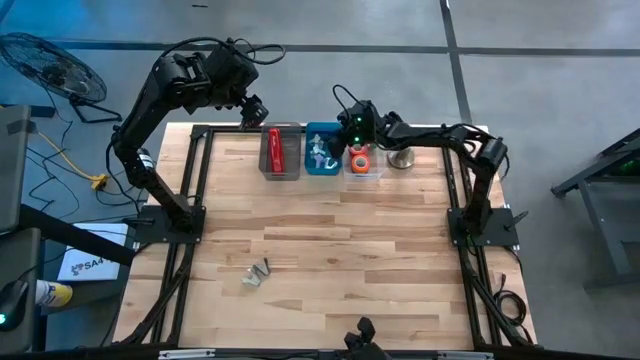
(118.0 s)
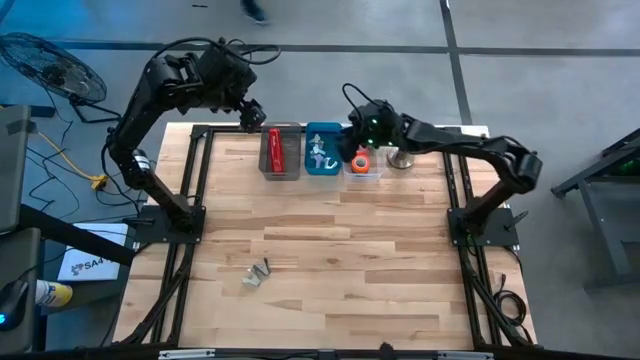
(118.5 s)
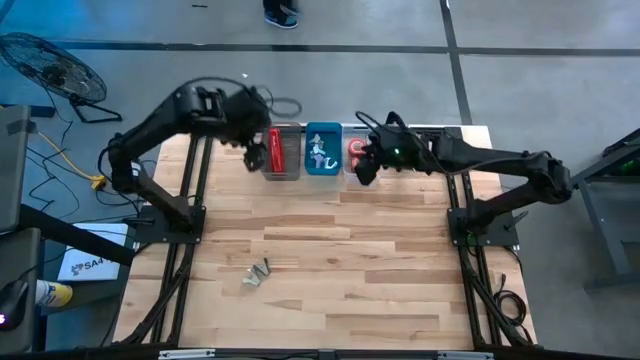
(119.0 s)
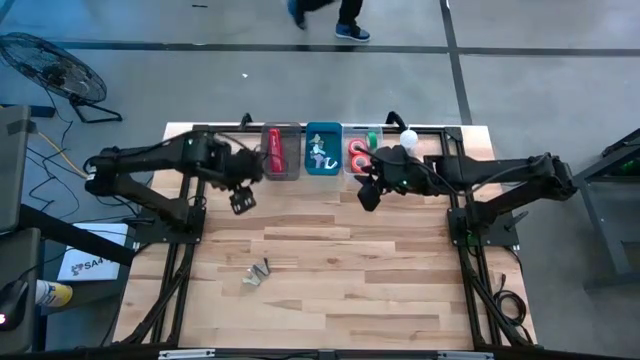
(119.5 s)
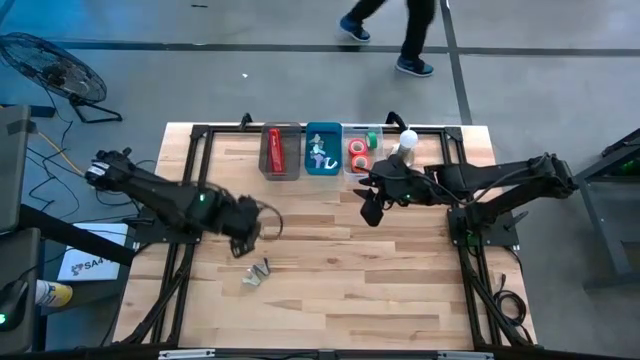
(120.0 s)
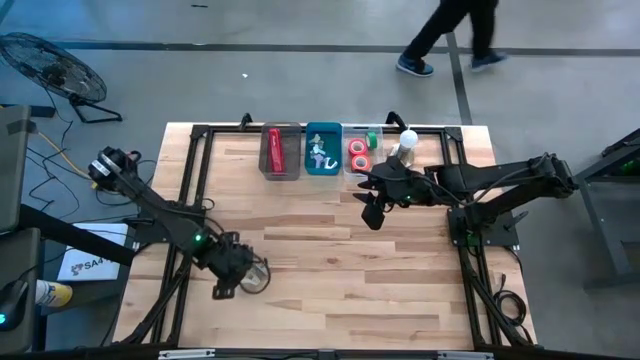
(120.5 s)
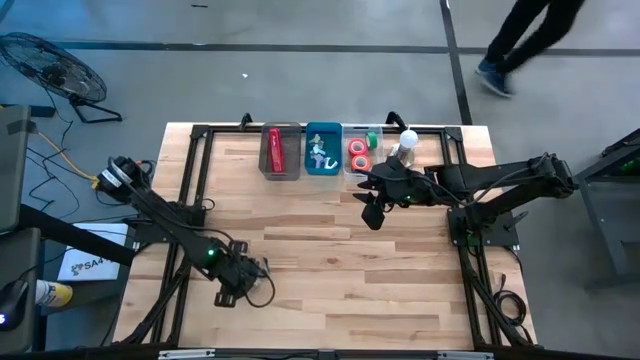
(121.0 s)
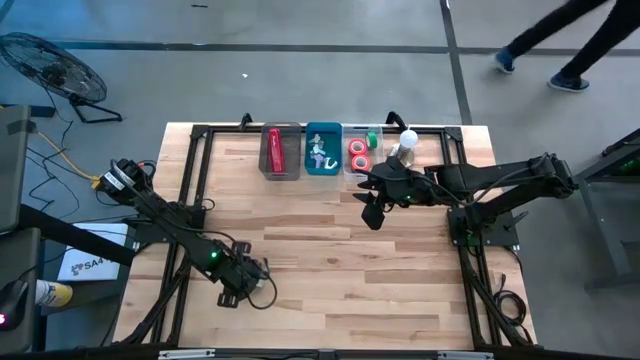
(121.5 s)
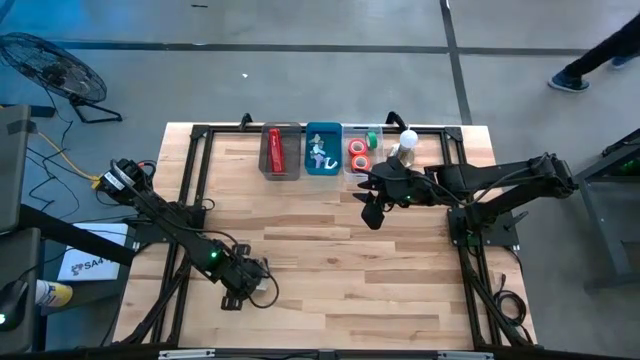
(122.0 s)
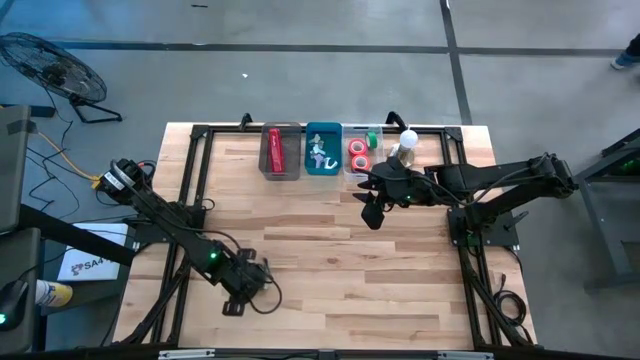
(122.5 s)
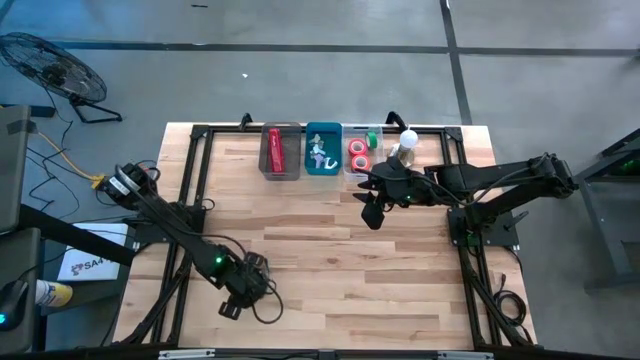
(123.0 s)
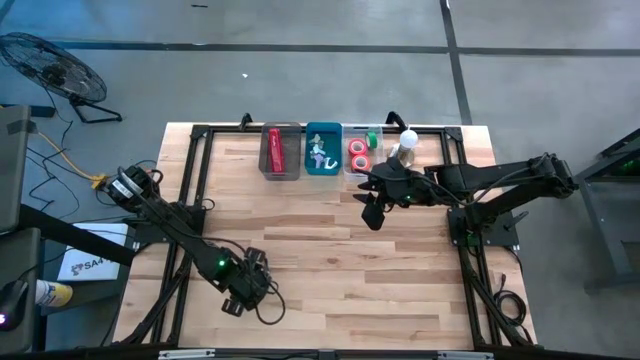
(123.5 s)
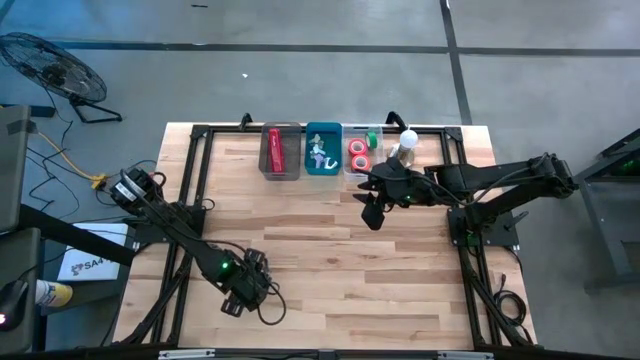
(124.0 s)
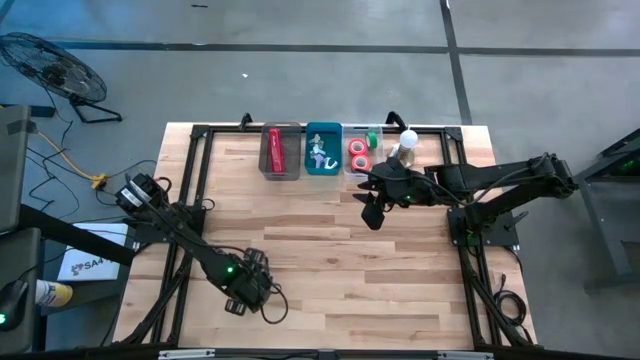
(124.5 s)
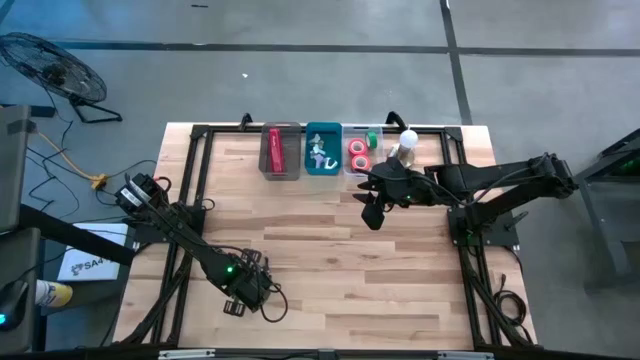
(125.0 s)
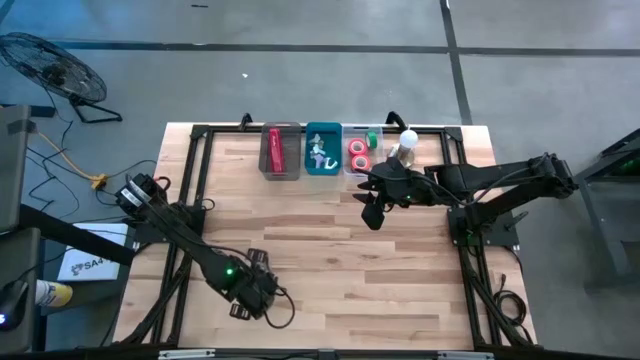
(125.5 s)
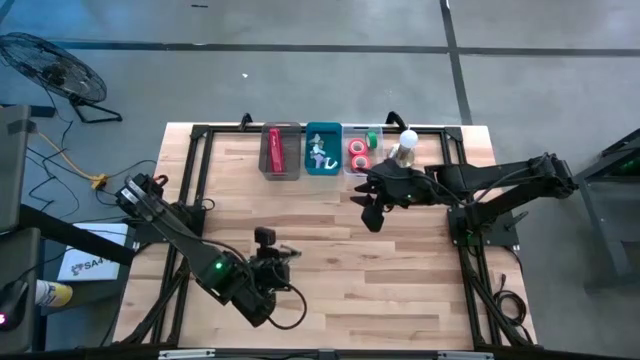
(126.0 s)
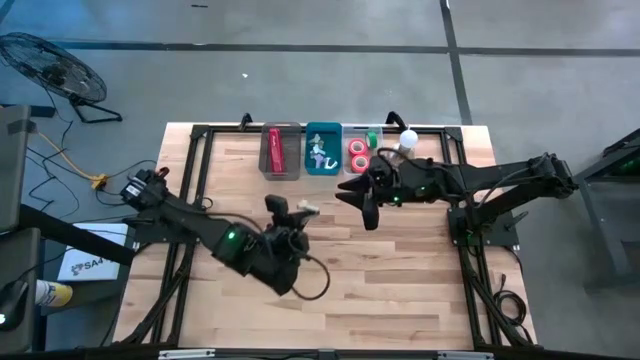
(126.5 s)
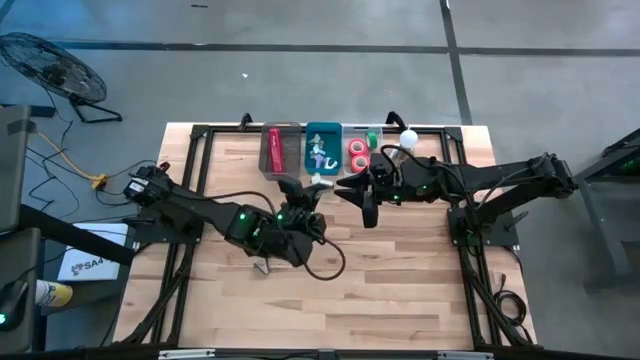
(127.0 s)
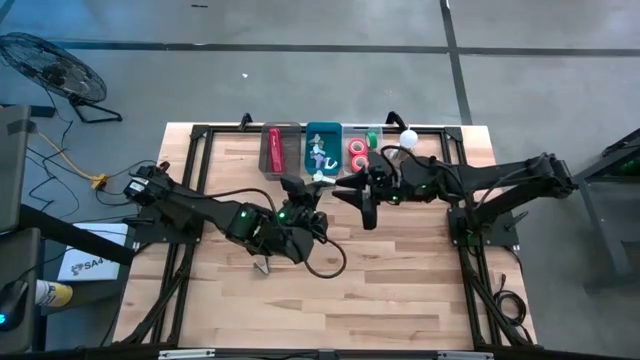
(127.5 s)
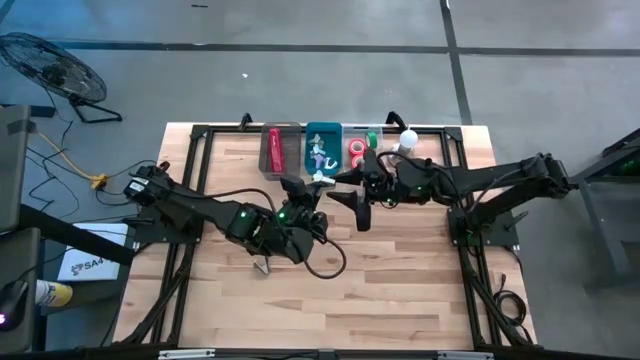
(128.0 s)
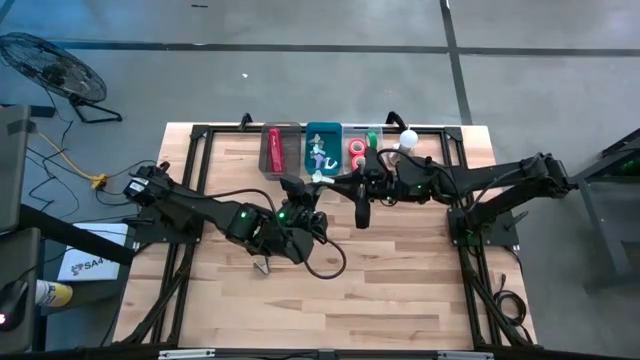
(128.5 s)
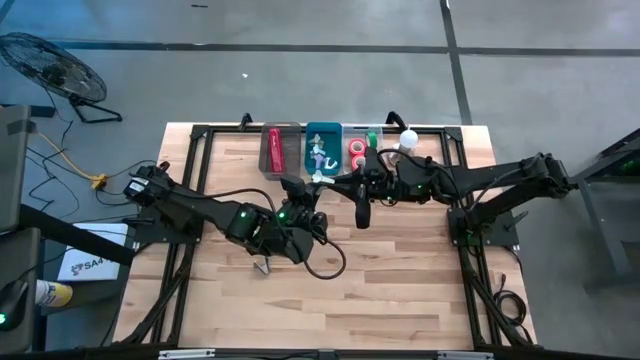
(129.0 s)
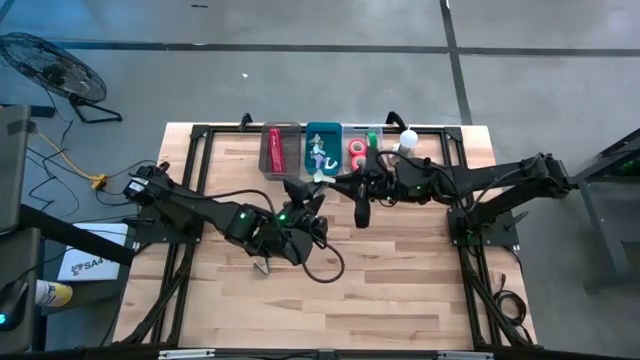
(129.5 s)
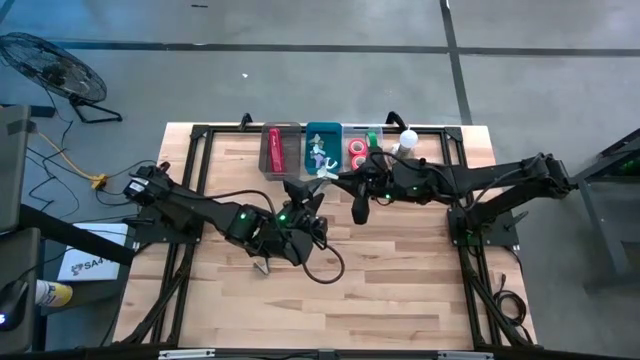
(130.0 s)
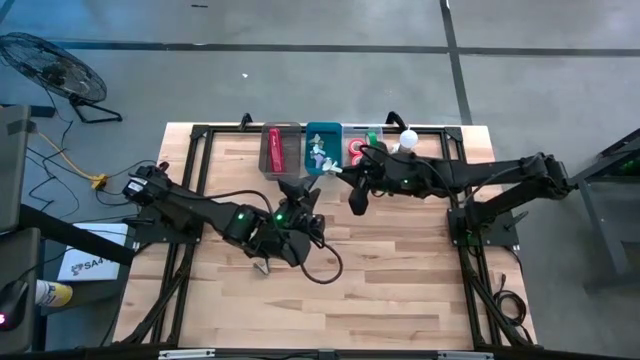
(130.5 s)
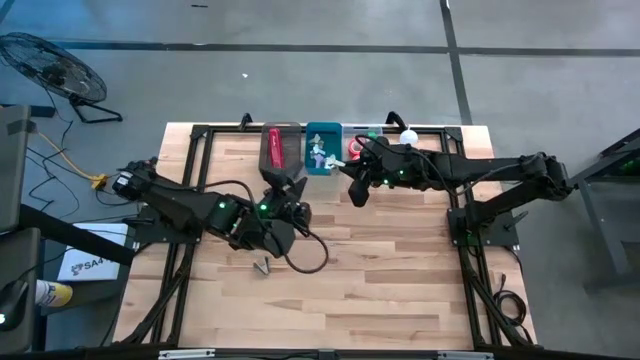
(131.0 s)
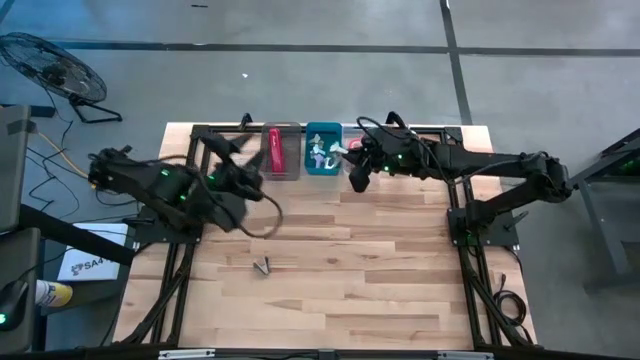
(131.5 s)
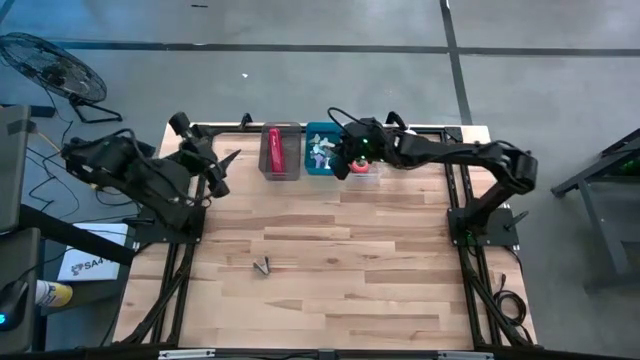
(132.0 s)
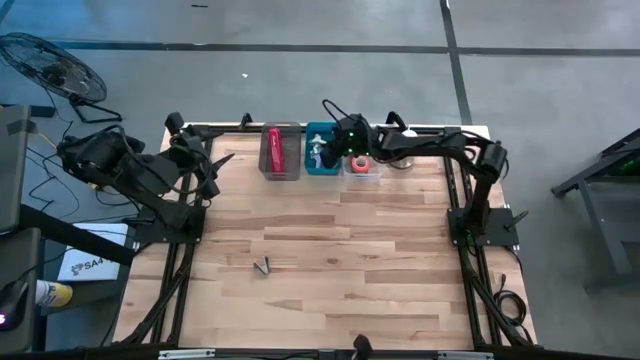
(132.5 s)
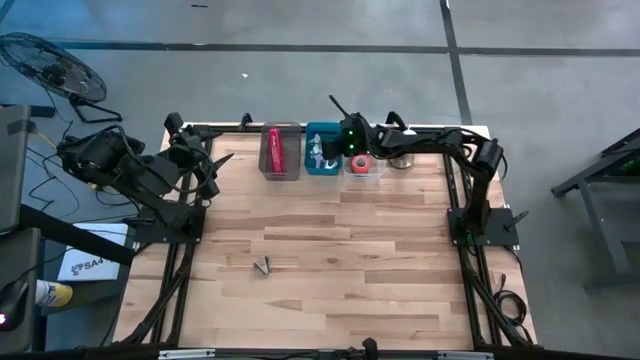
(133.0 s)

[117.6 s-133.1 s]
Task: Pick and place Stapler, Stapler remover, tape
Put the gray staple remover into the blue bin

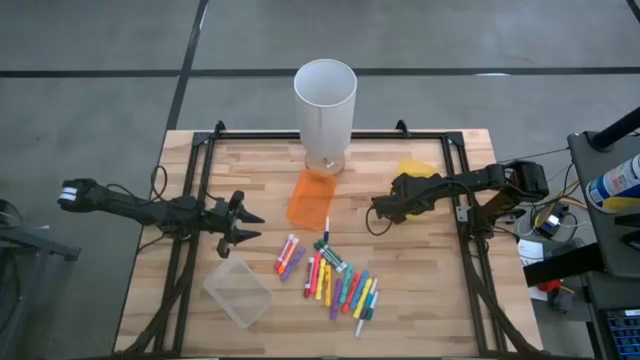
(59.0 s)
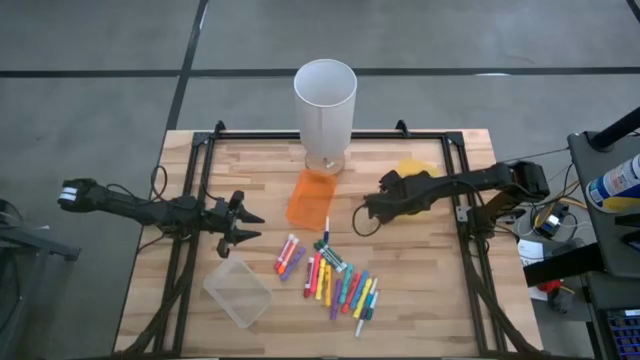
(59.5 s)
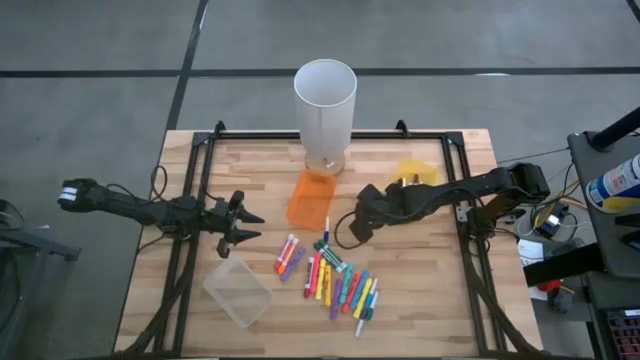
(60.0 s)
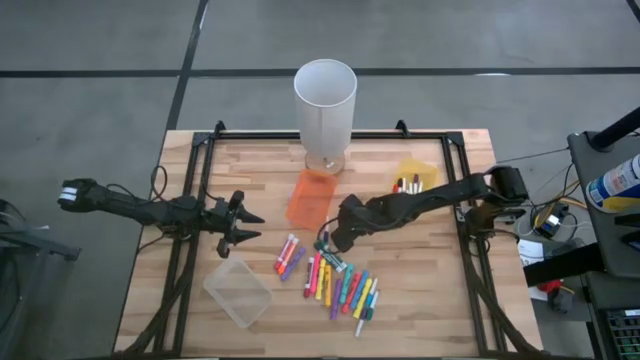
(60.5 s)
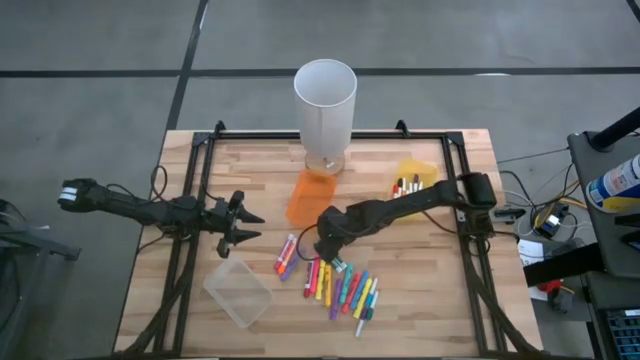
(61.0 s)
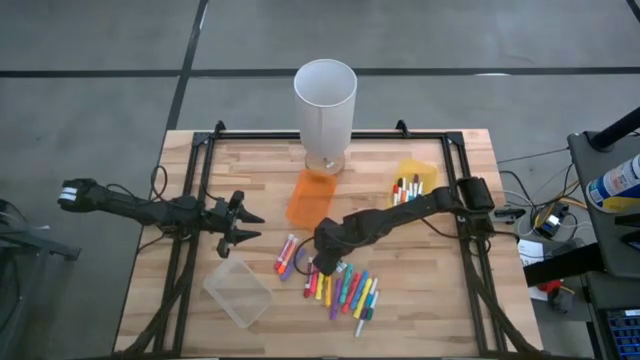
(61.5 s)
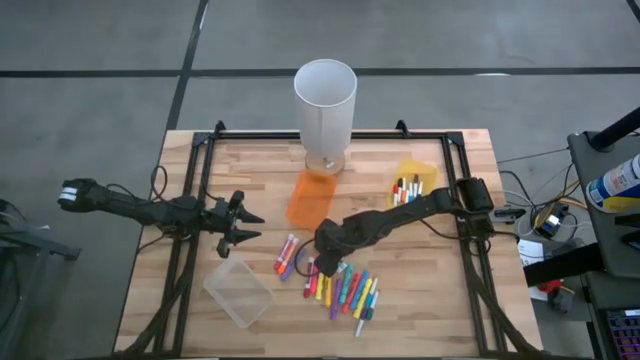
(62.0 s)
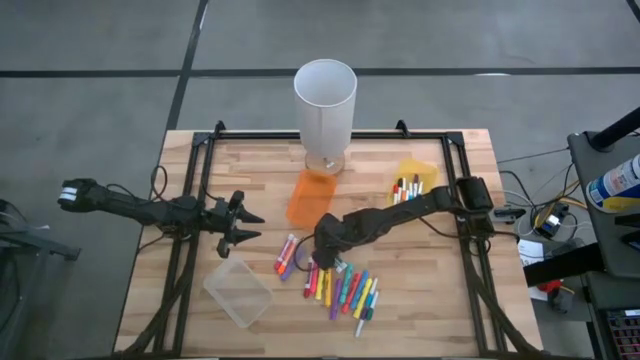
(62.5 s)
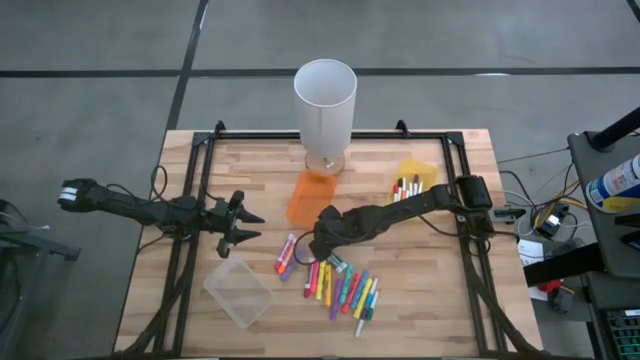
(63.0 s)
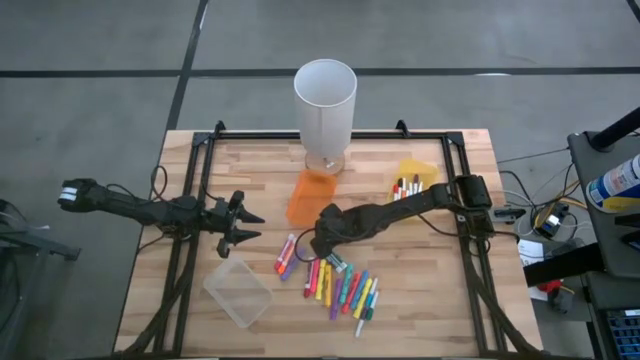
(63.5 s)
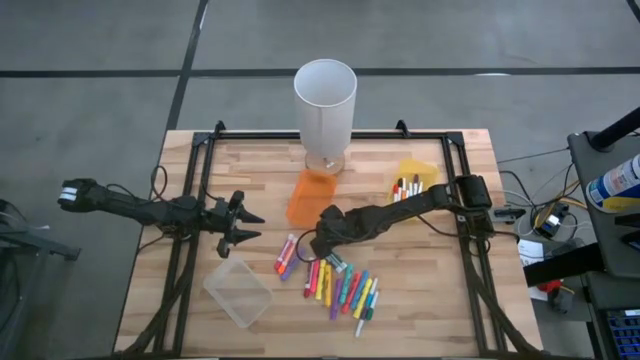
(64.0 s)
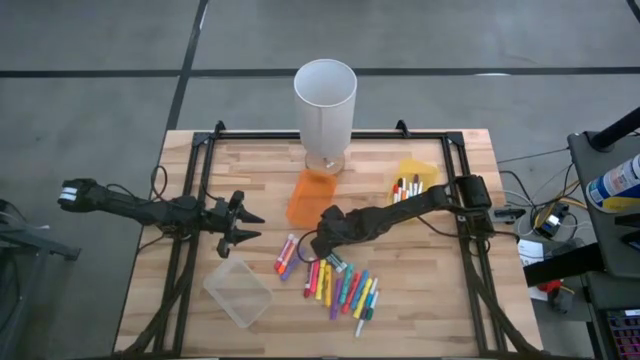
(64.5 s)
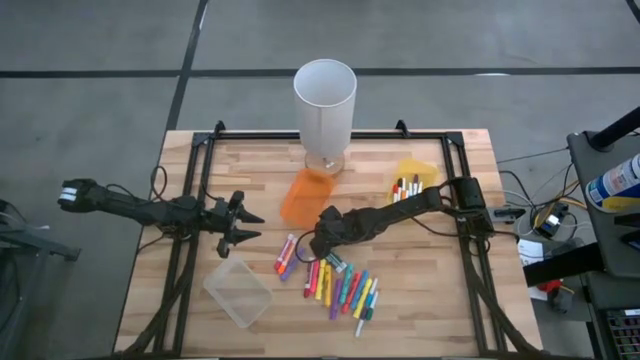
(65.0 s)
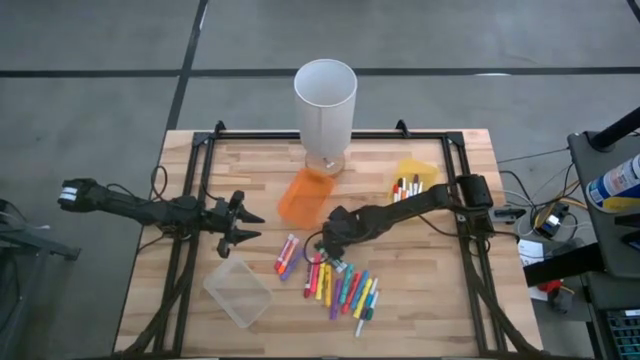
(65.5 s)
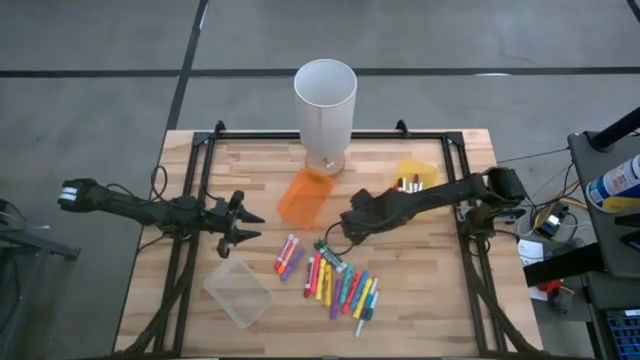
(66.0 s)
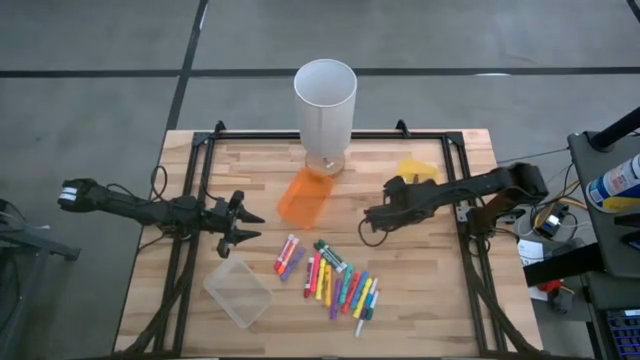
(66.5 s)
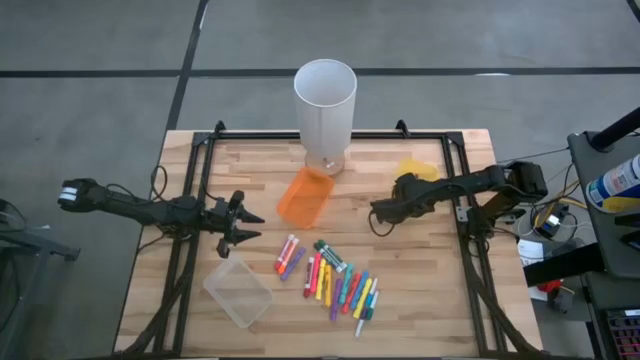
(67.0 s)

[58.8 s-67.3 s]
Task: Pick & Place Markers
Put the small blue marker pen into the yellow bin
